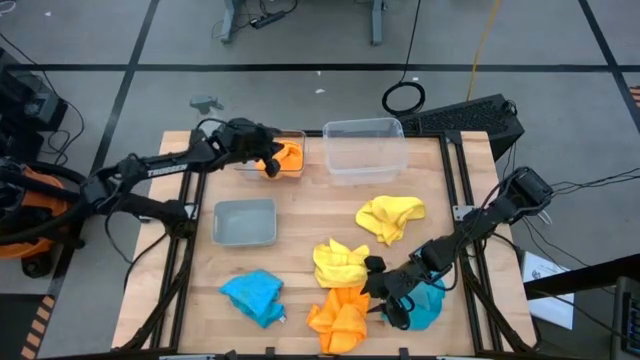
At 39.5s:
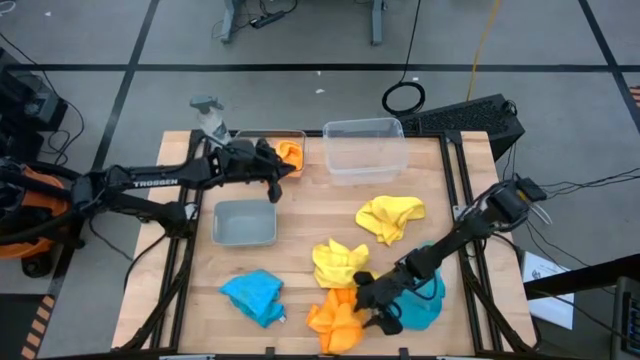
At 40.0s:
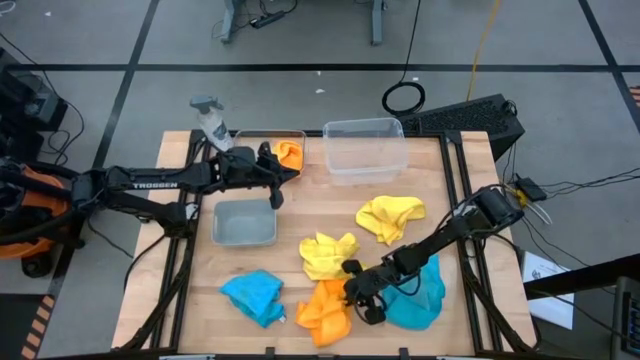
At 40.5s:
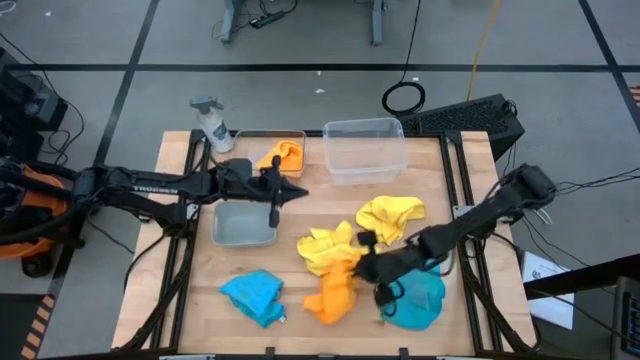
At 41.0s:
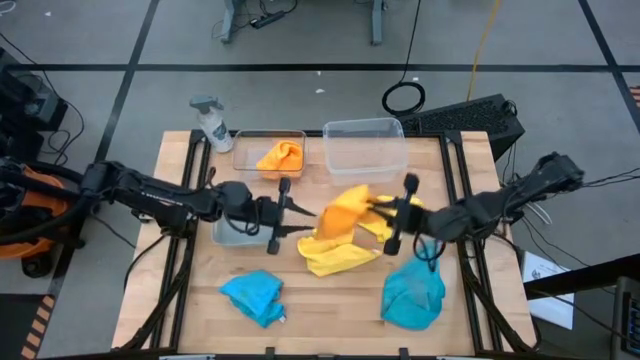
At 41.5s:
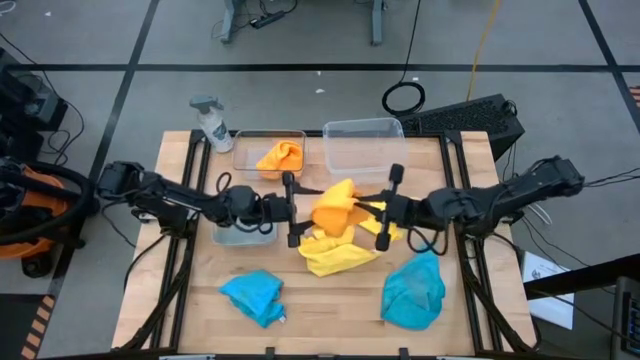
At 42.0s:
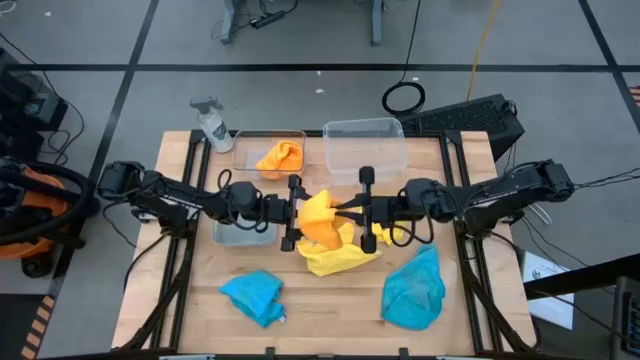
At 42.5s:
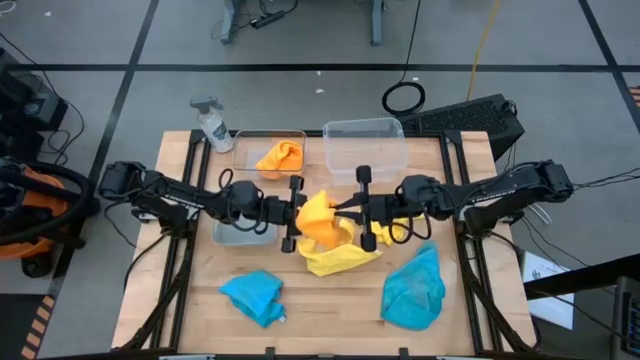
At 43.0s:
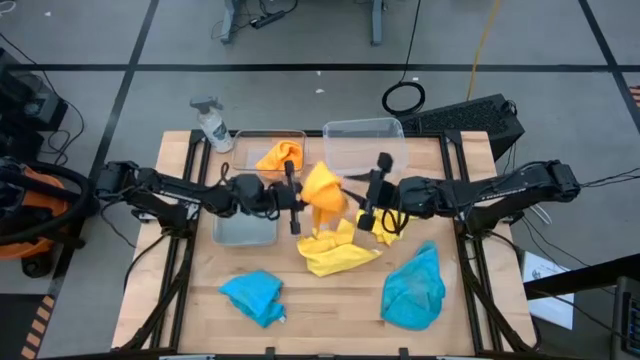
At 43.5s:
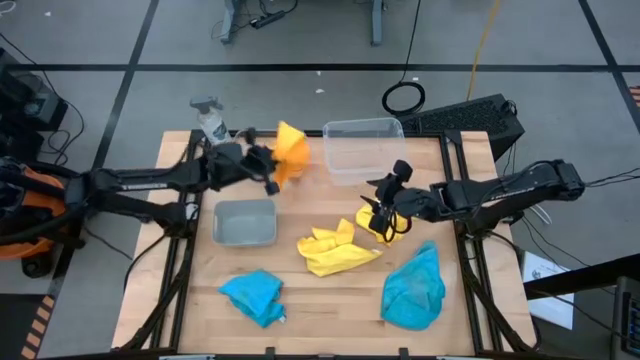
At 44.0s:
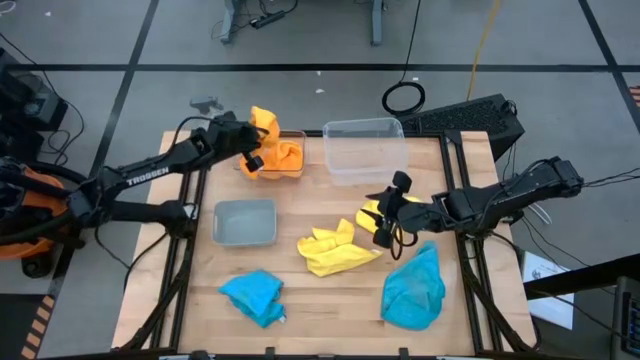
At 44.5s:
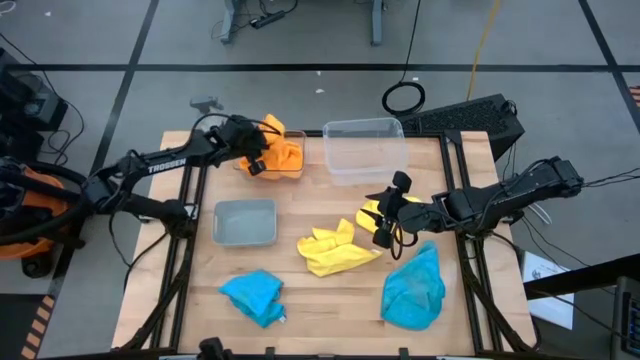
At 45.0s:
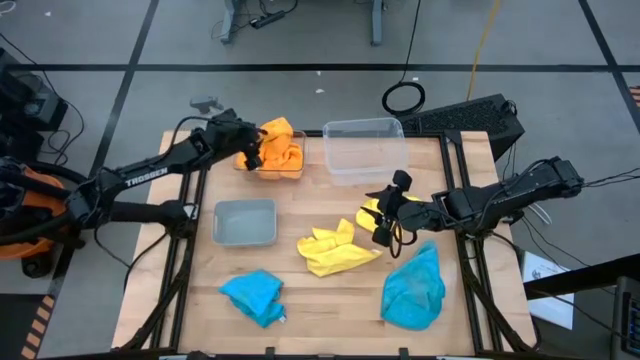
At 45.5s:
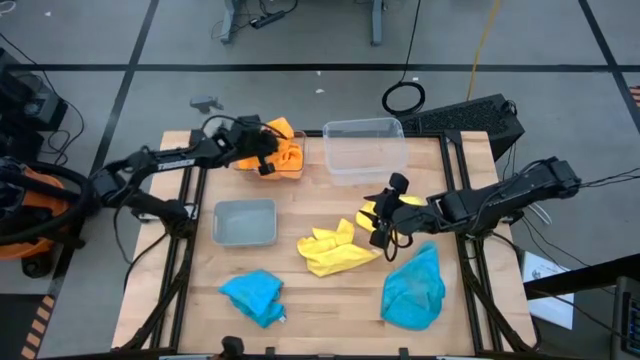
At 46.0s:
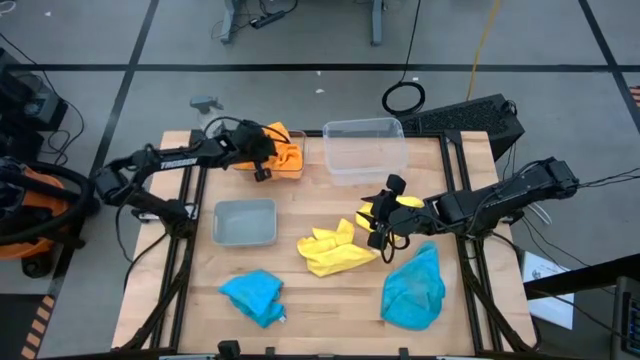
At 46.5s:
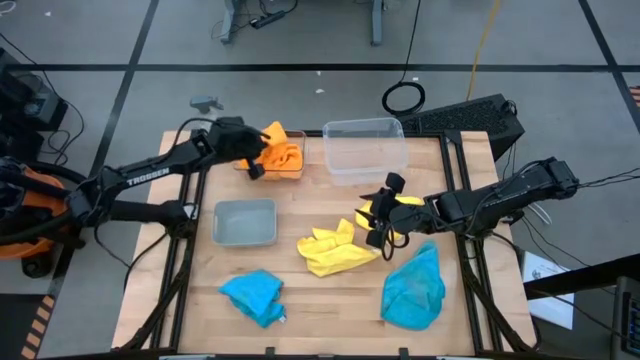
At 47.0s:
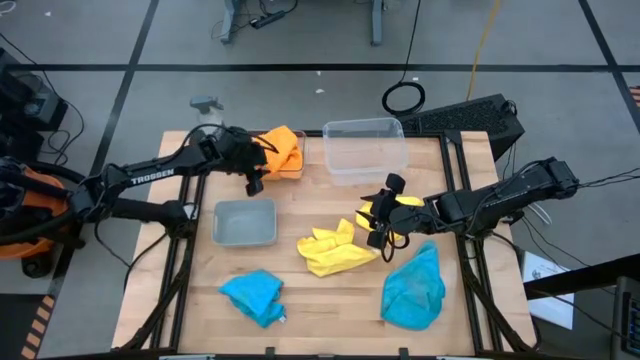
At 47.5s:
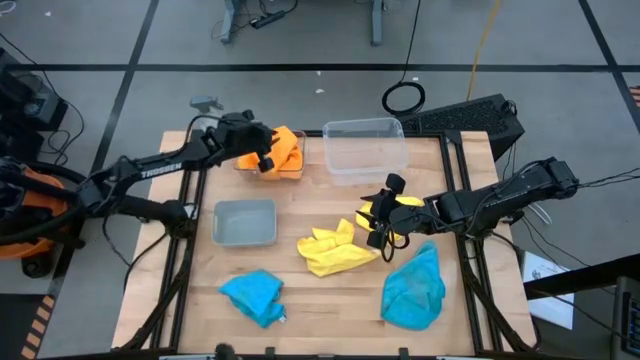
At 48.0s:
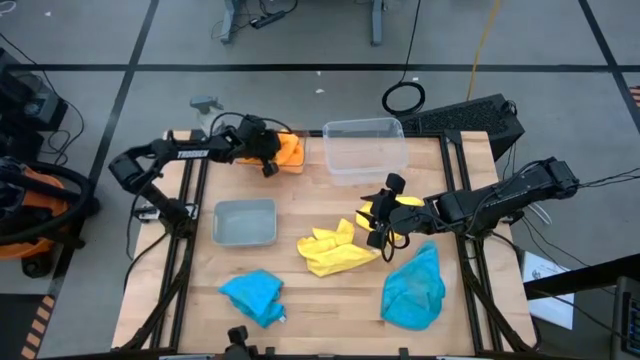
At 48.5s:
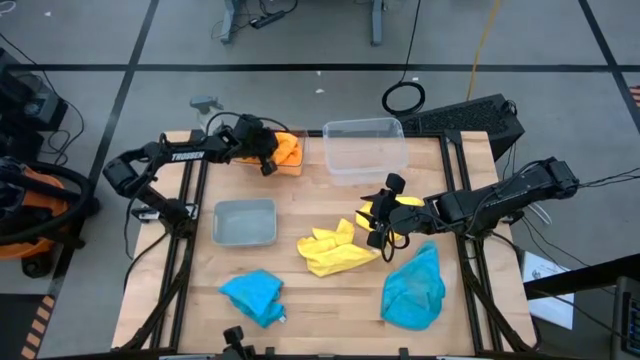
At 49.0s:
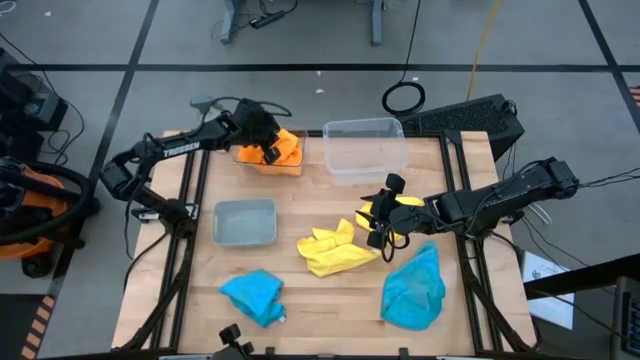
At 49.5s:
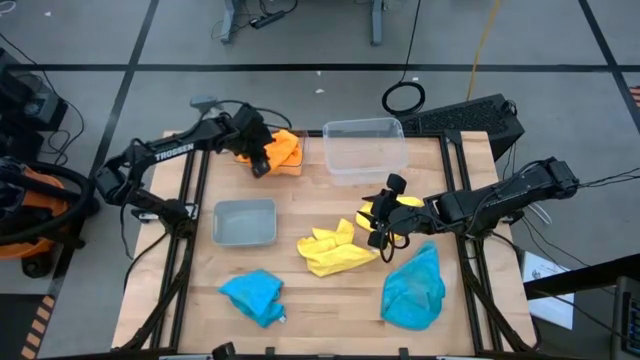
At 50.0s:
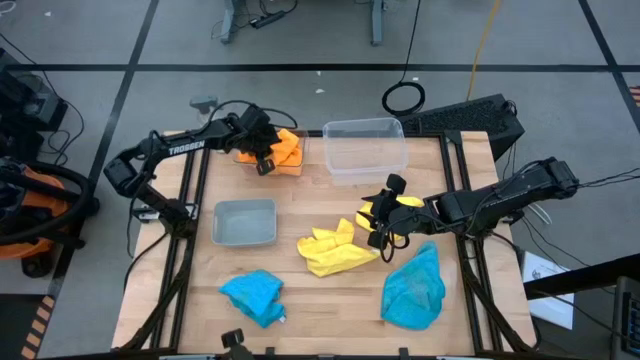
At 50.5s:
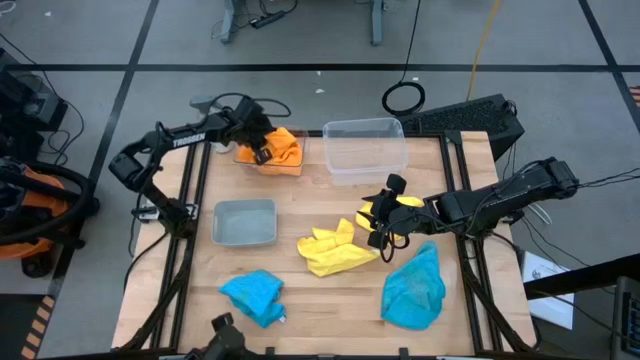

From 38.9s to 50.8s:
Task: Sort microfiber towel by color & place in baskets
Put the bottom orange towel into the left transparent bin

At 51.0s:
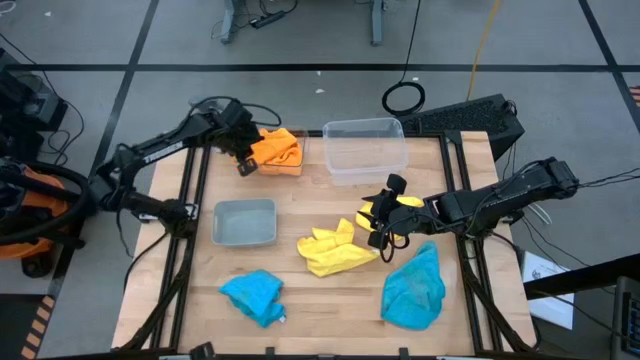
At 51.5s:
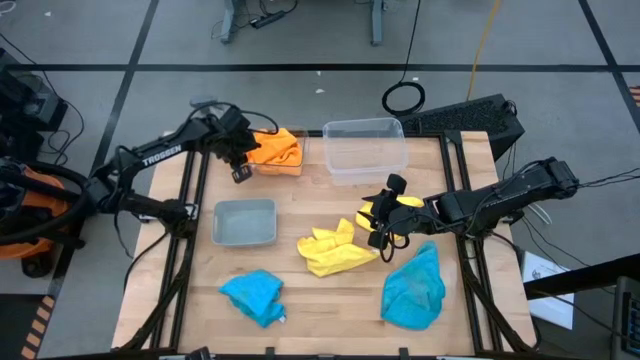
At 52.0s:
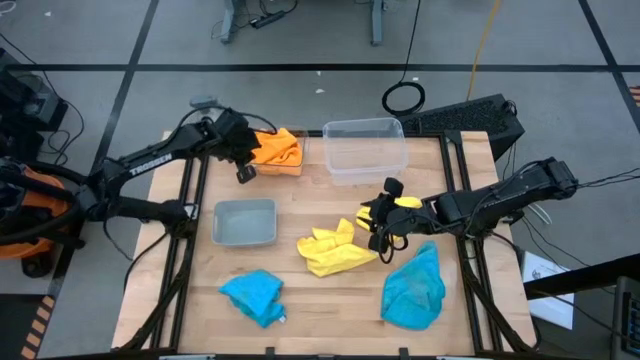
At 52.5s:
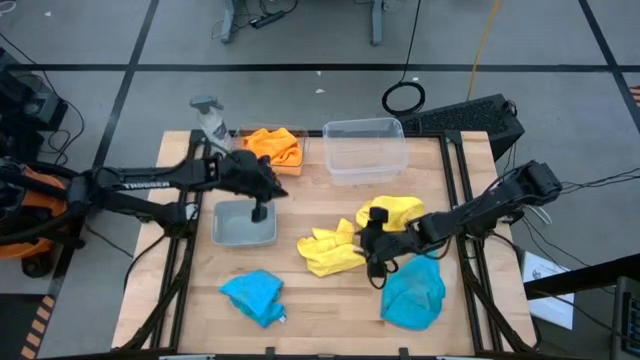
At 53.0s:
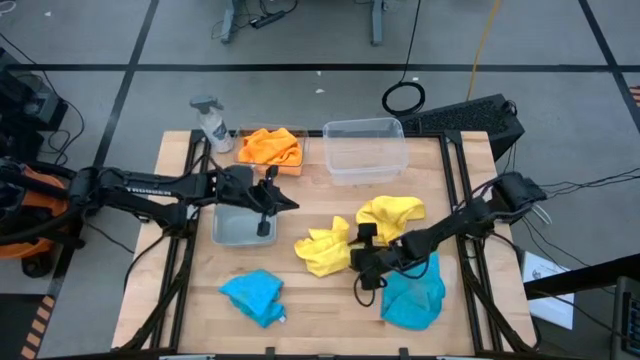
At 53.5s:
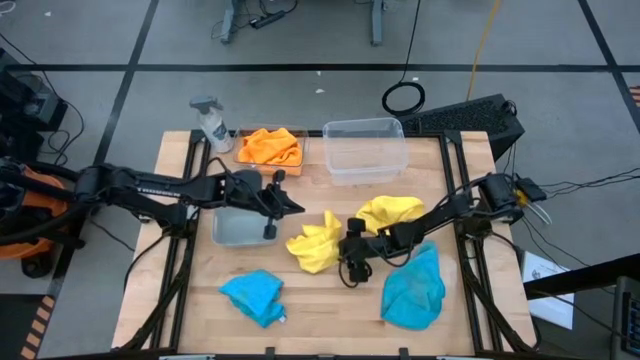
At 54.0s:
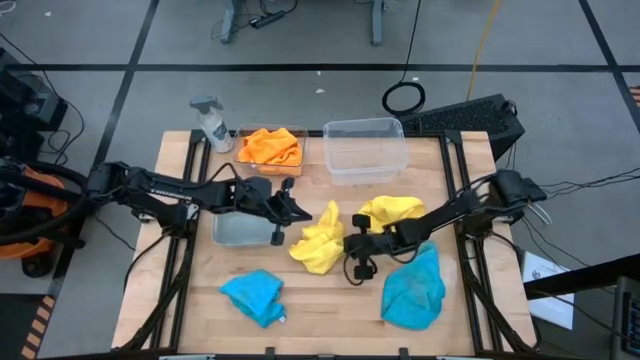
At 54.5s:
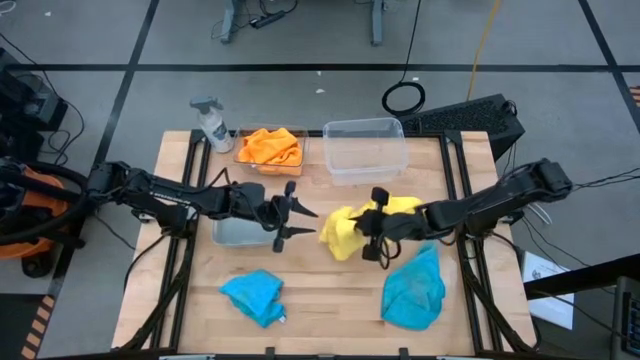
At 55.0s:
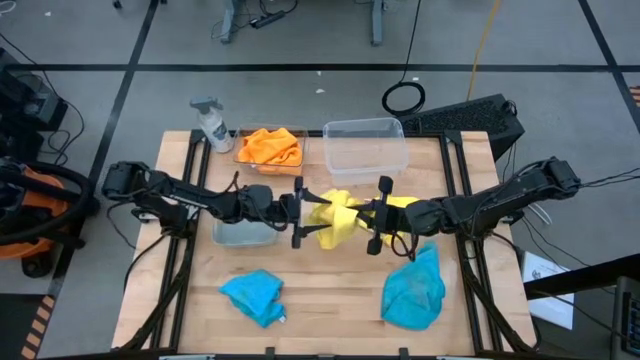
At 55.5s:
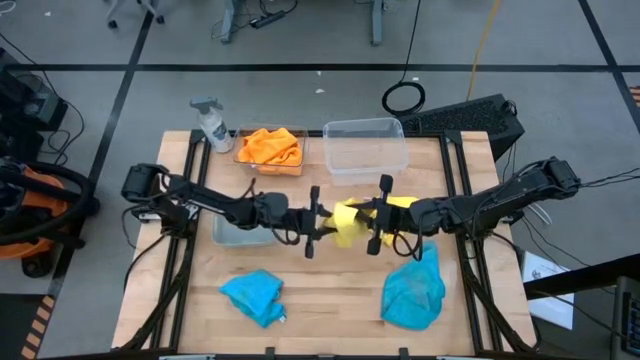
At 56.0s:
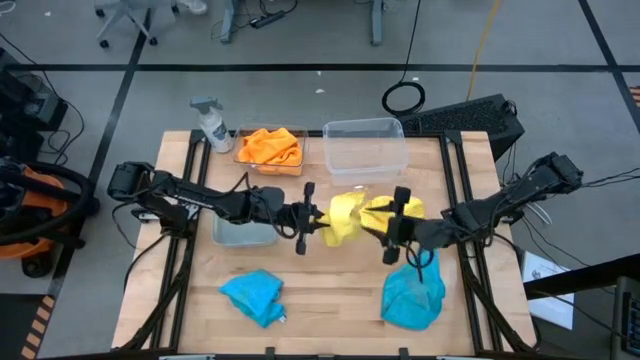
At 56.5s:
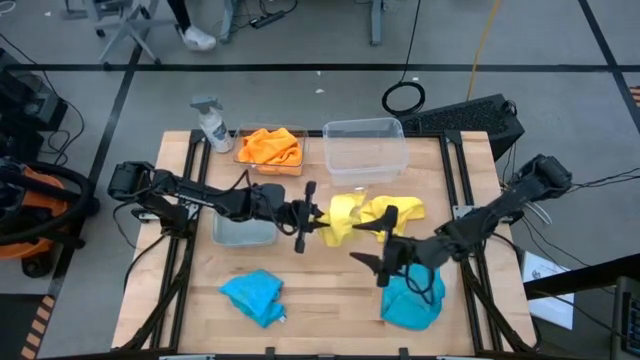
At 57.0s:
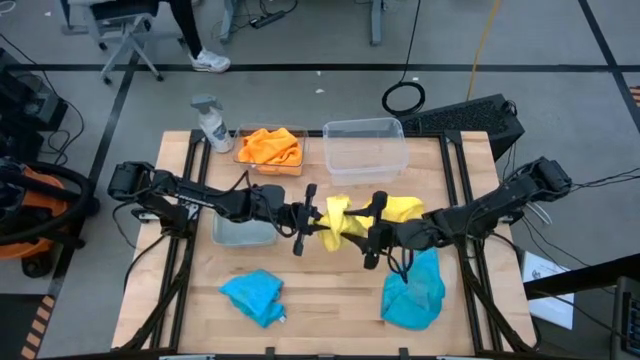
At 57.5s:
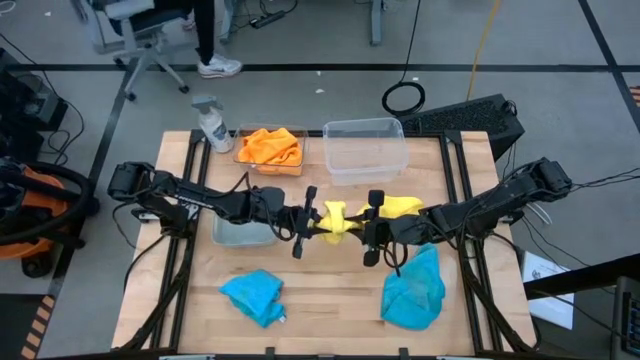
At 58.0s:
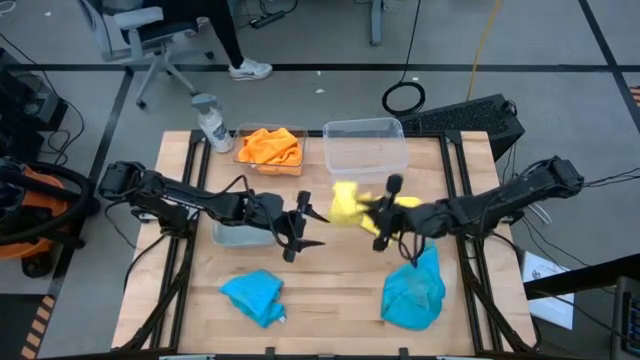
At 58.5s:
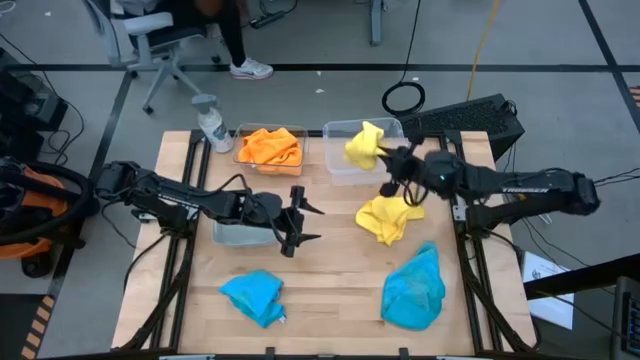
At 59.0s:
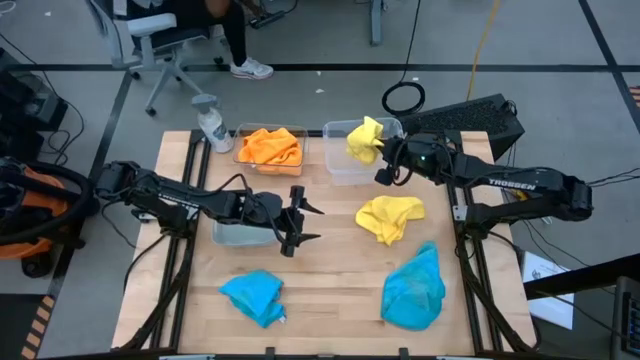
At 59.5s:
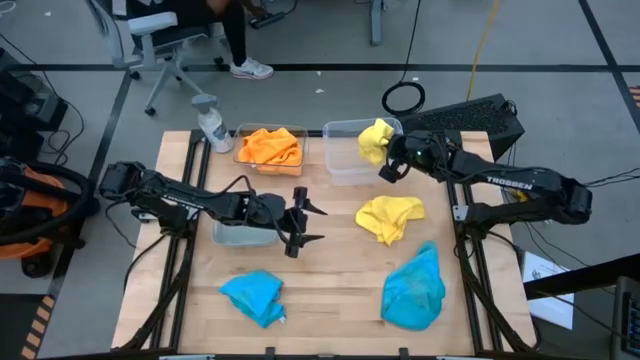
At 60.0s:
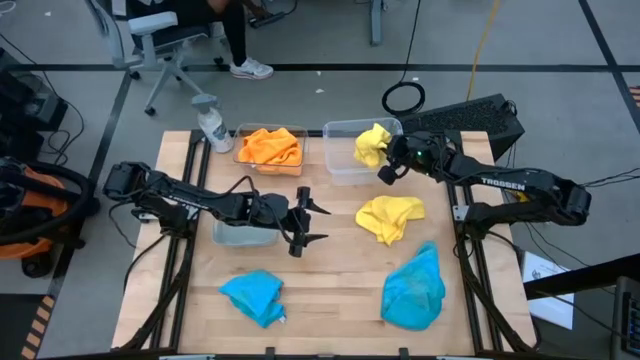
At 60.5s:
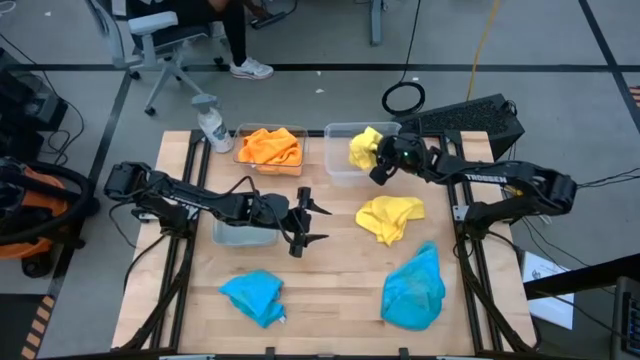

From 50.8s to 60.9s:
Put the left yellow towel into the right transparent bin
